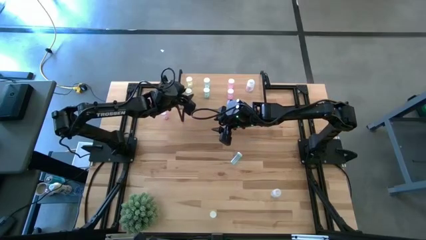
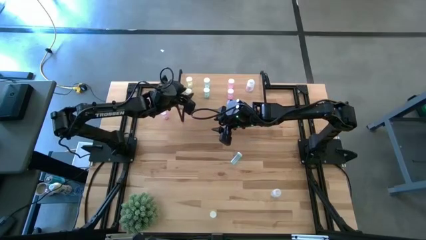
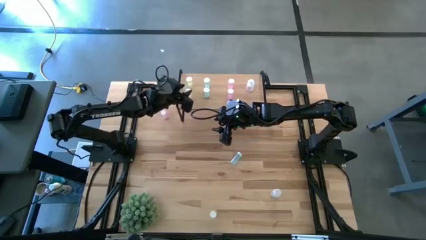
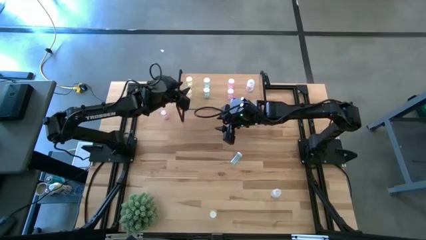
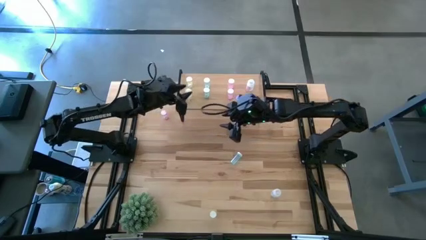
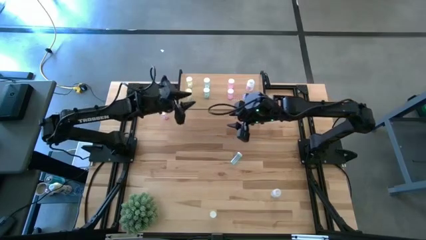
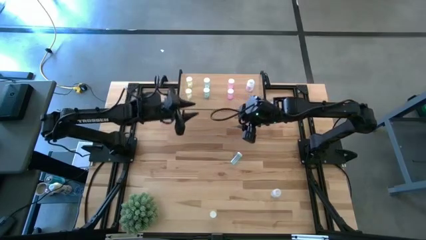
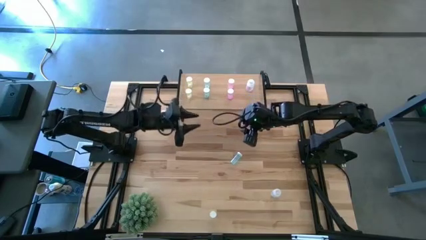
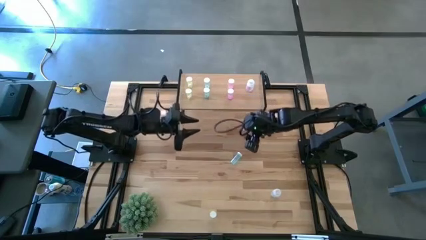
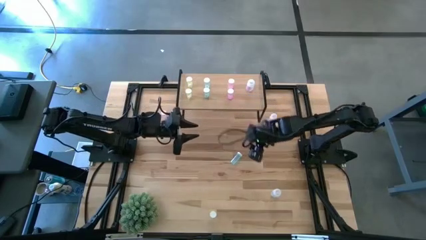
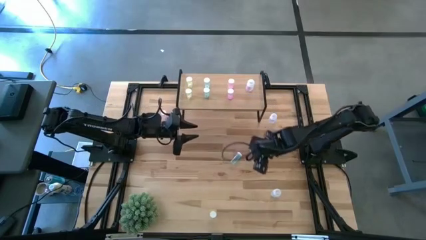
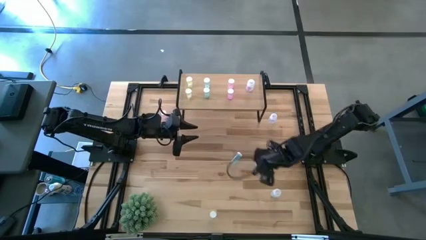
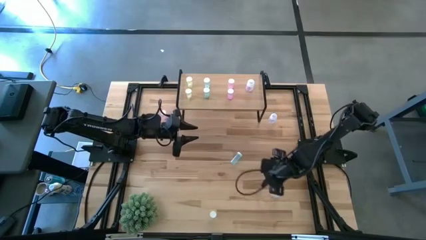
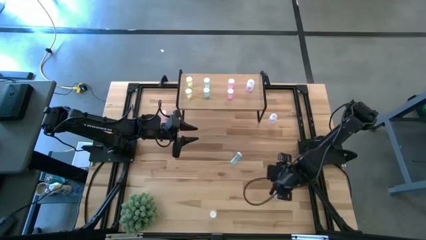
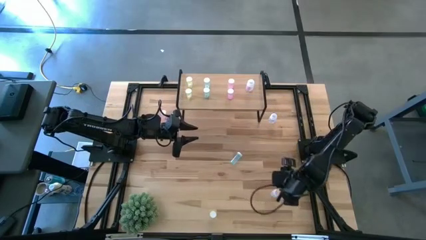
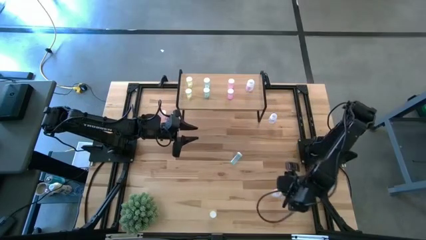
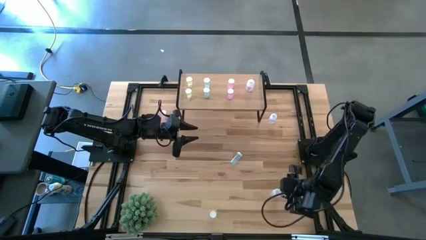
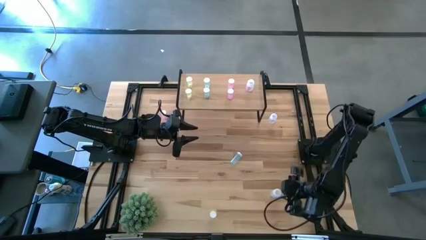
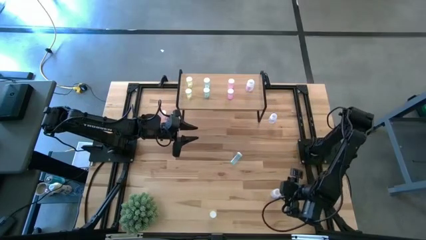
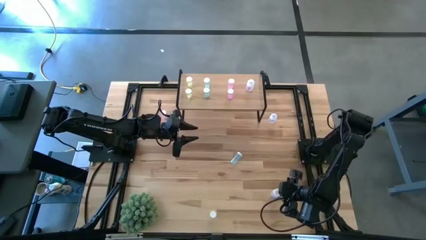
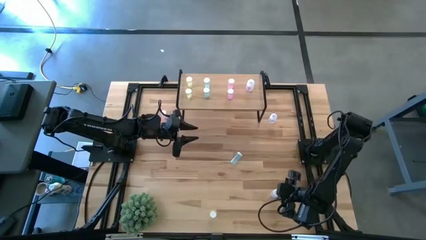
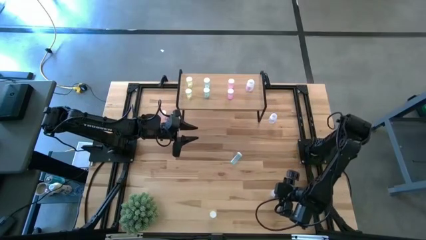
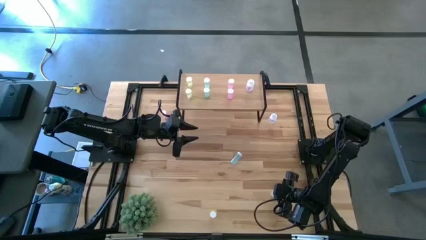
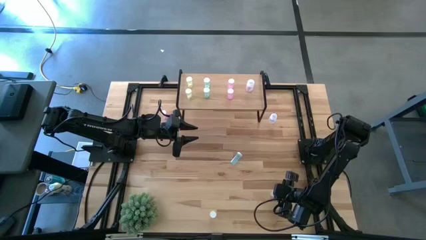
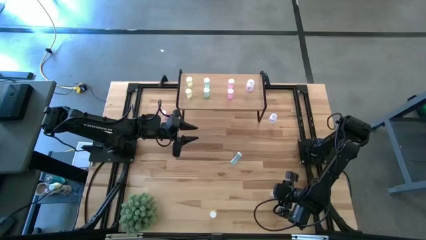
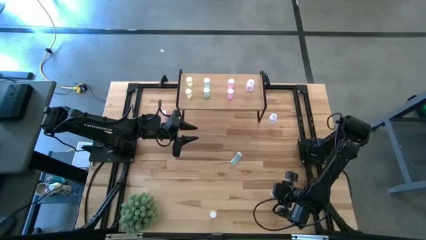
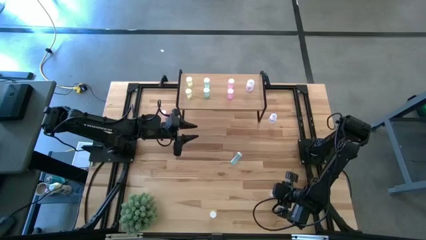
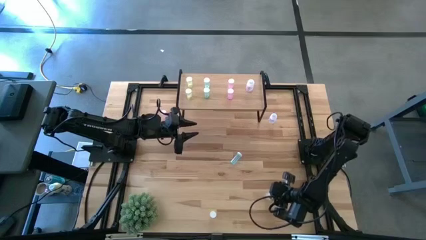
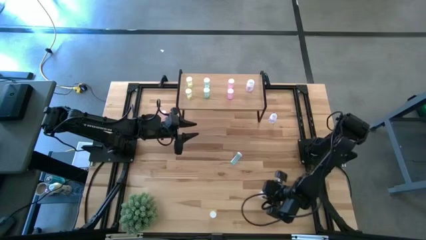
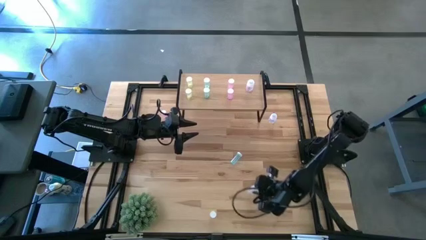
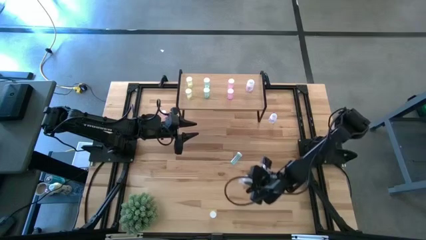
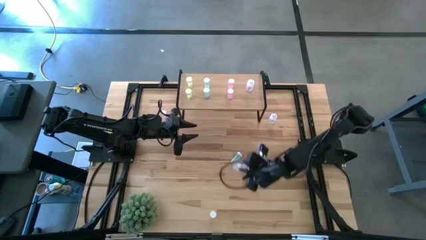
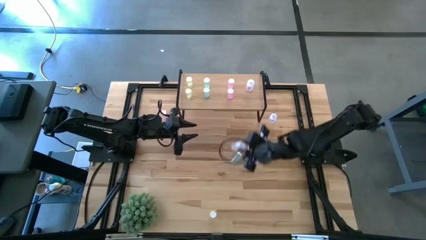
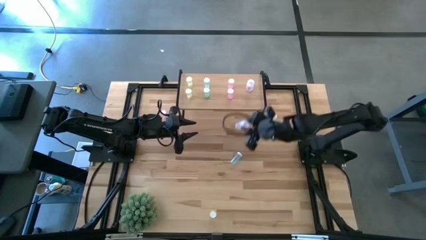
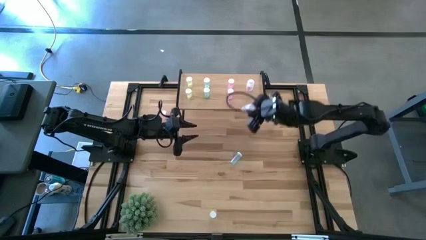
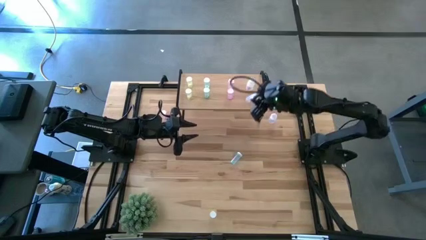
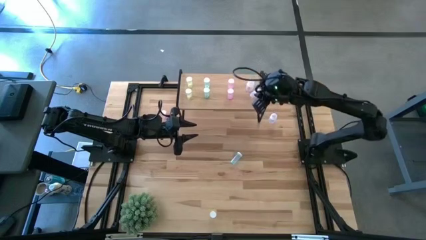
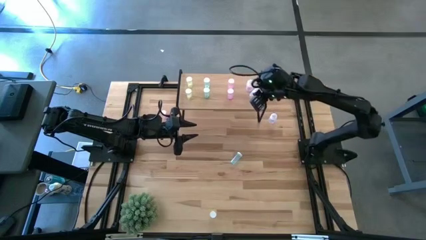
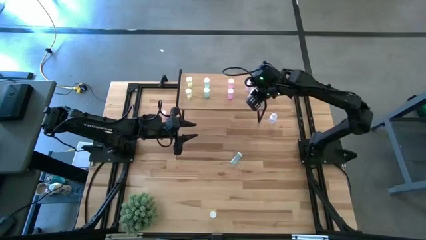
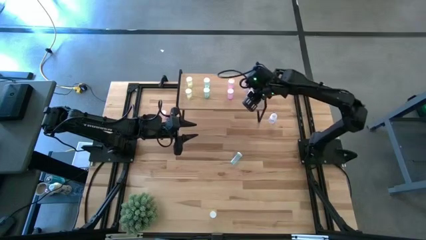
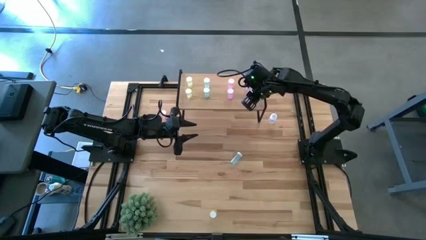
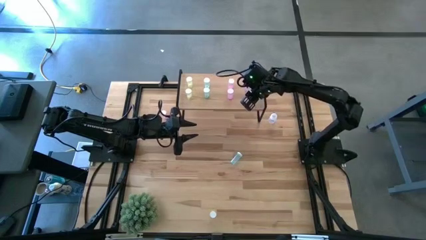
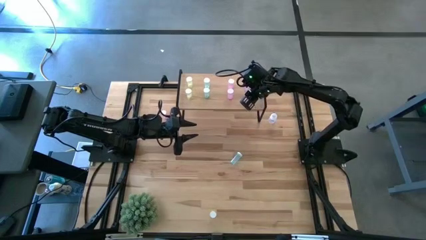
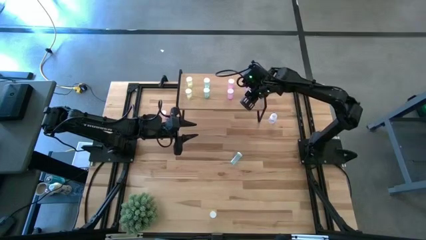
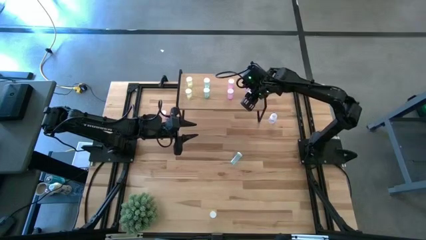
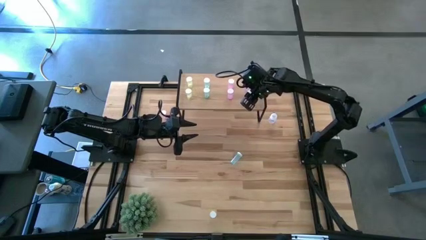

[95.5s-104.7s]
Task: Pick and place medicine bottles onto shelf by color
Put the bottom transparent pill bottle on the shelf

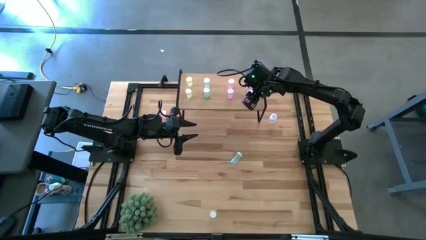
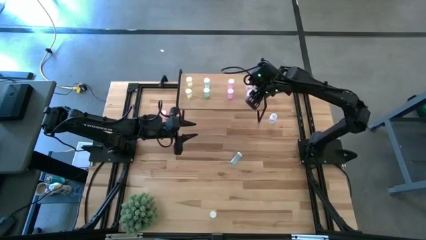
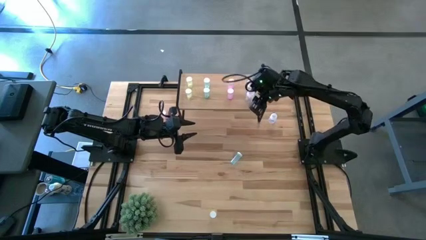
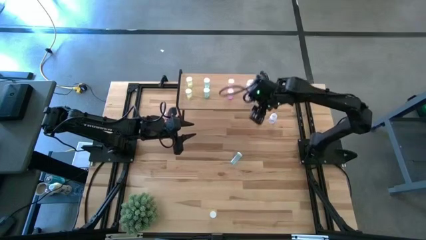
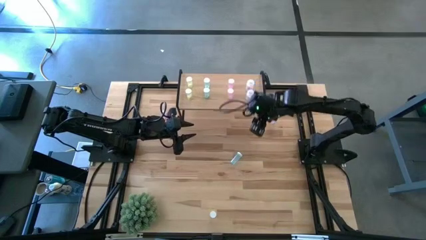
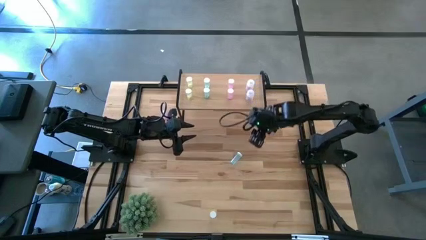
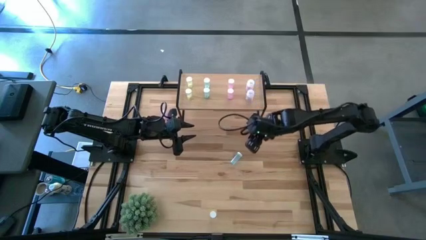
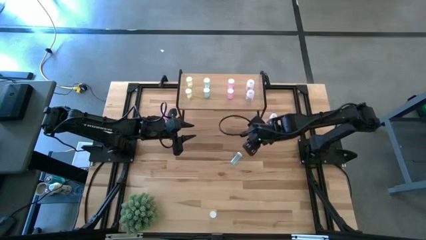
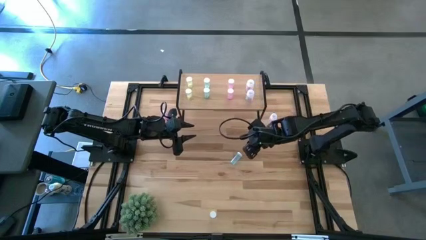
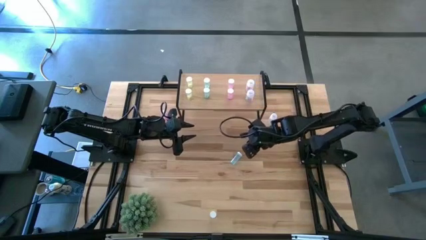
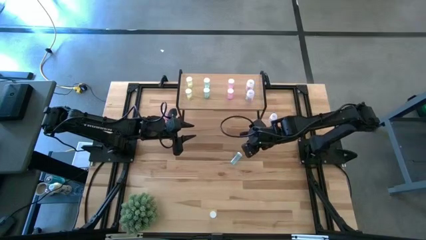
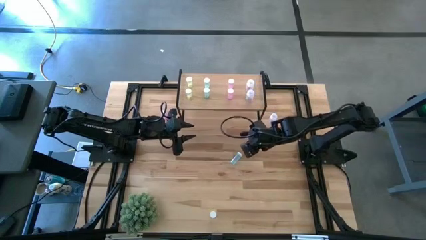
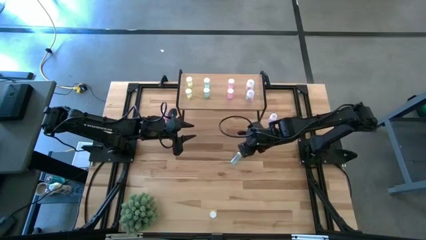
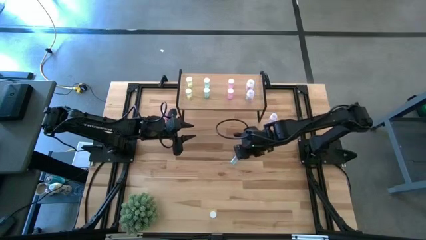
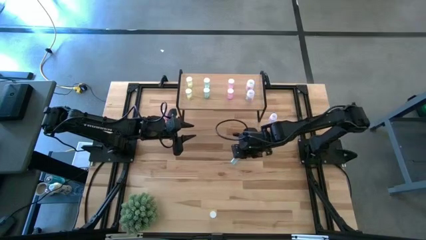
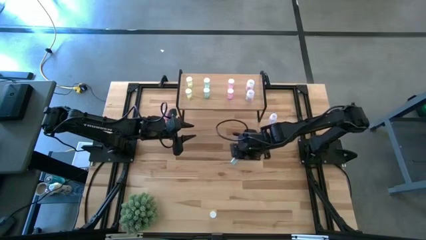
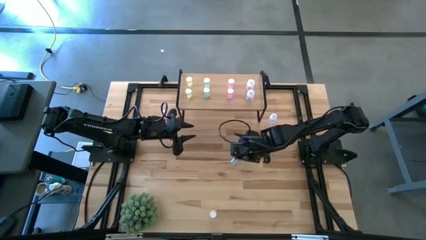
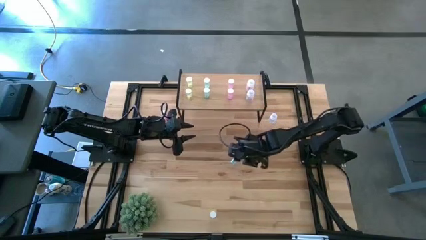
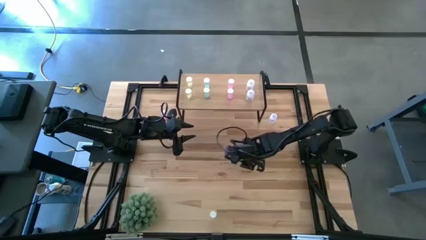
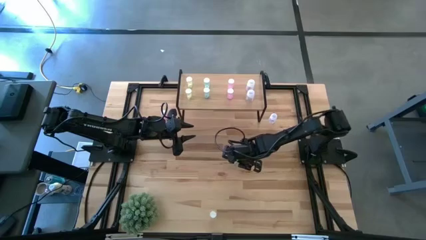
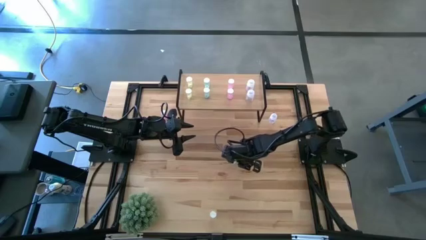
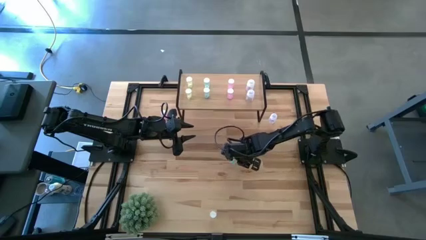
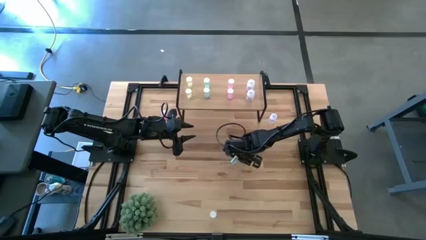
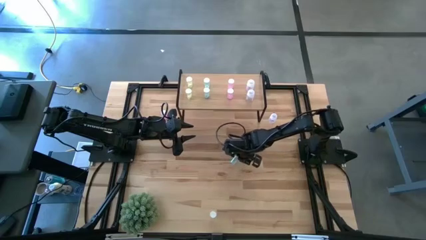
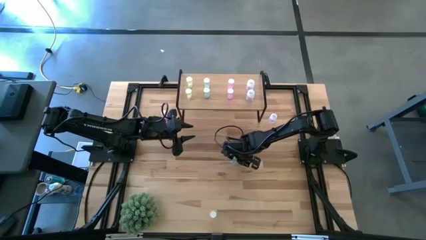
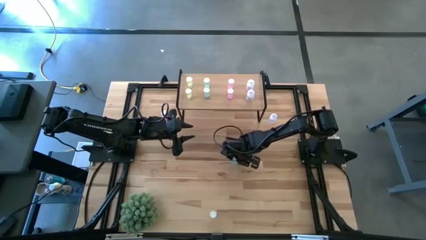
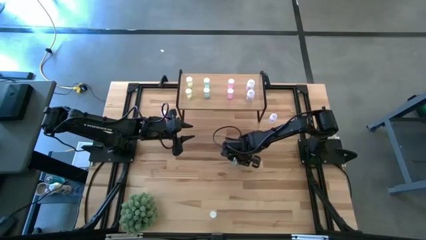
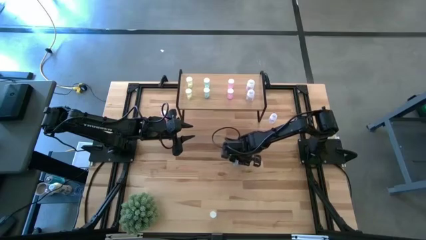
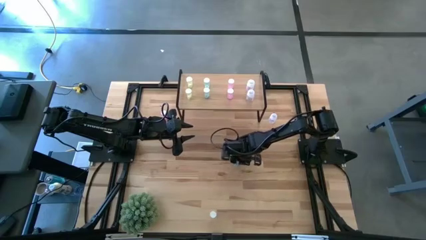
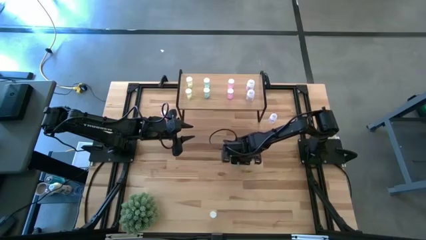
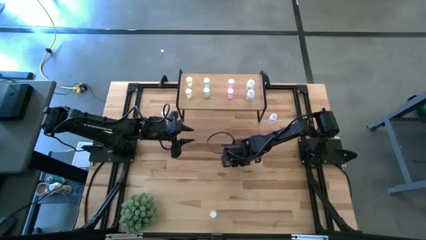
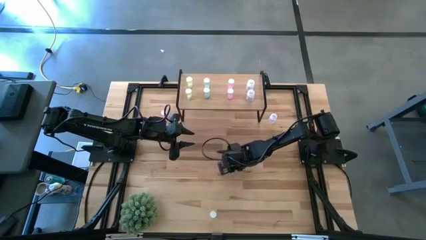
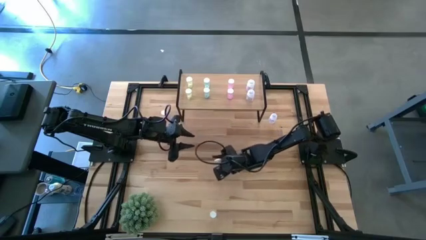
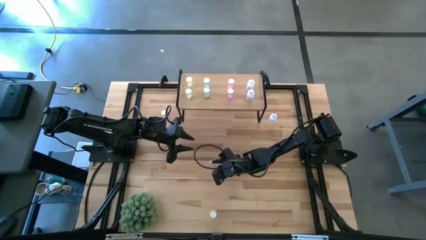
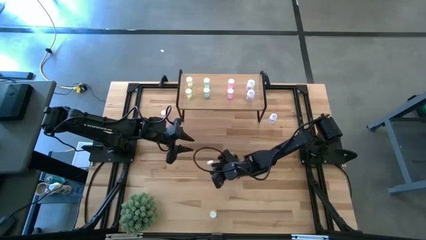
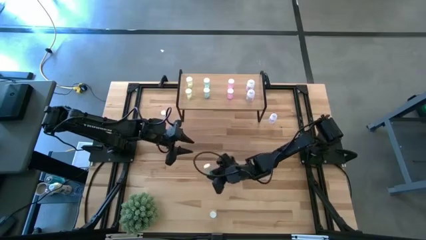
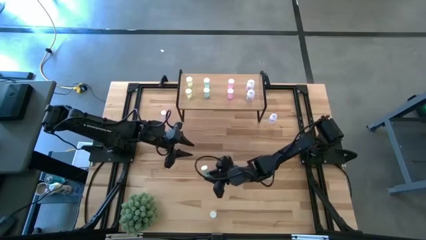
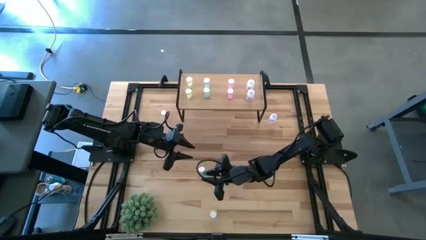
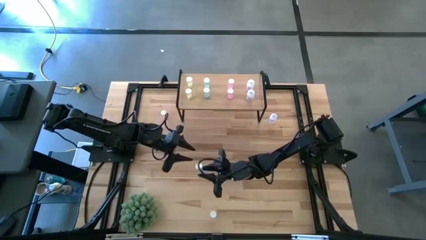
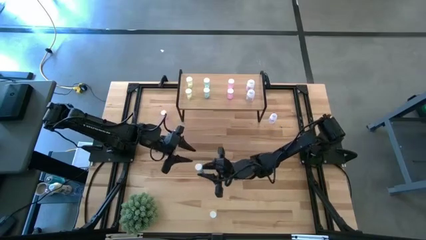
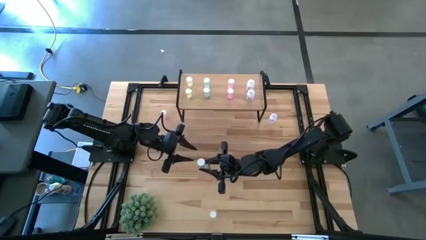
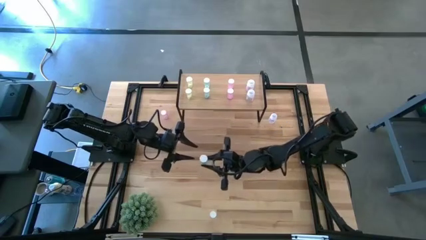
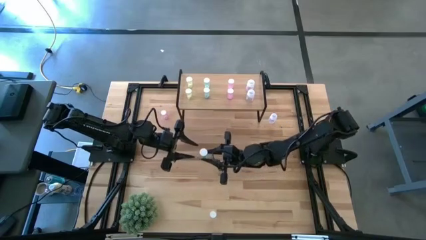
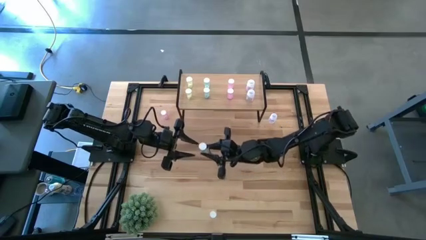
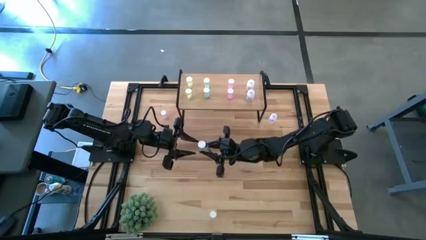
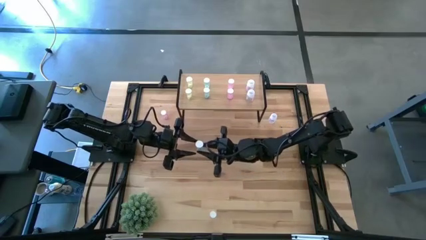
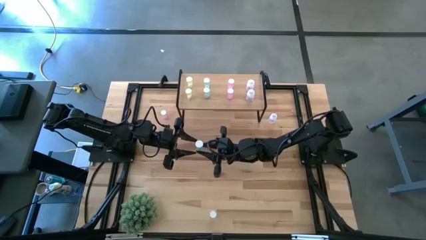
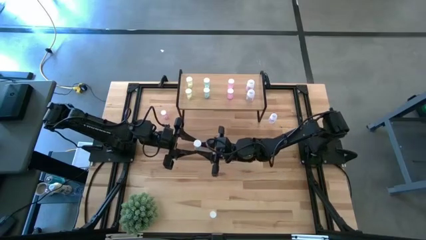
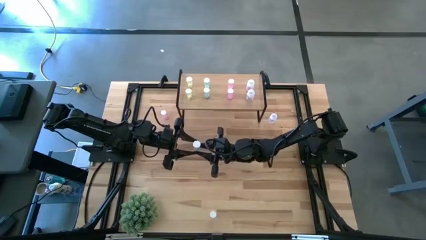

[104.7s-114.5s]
Put the blue pill bottle and align it with the other blue pill bottle on the shelf
